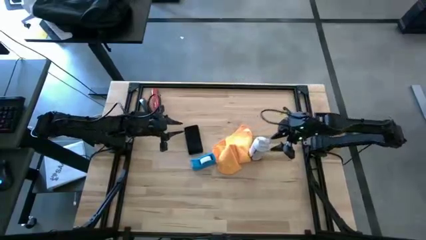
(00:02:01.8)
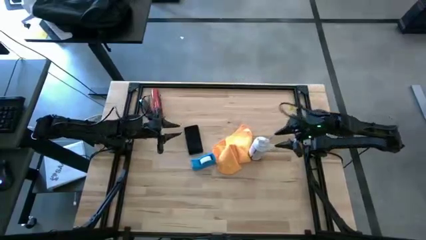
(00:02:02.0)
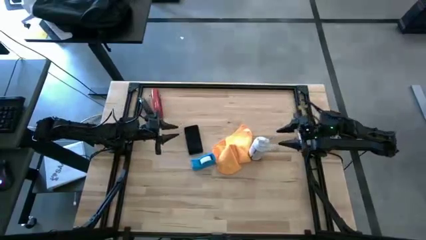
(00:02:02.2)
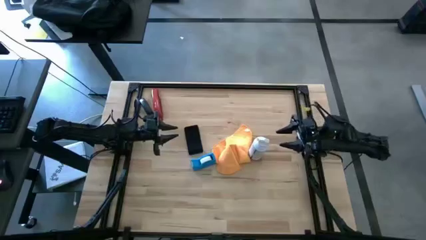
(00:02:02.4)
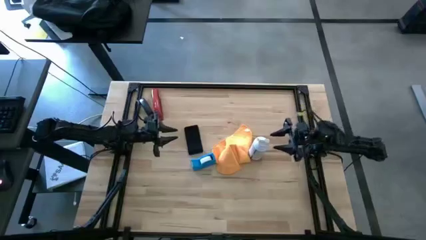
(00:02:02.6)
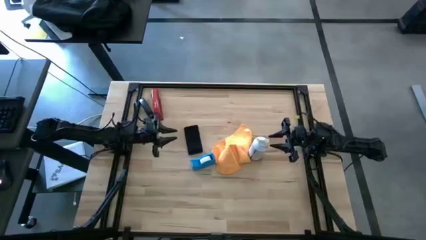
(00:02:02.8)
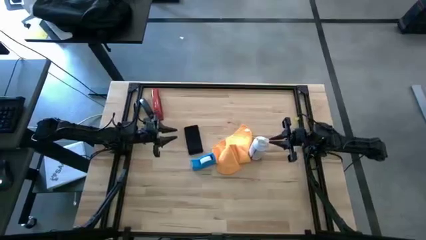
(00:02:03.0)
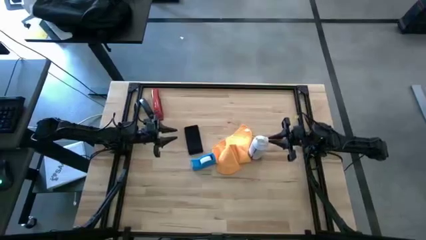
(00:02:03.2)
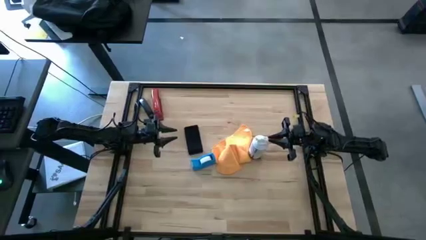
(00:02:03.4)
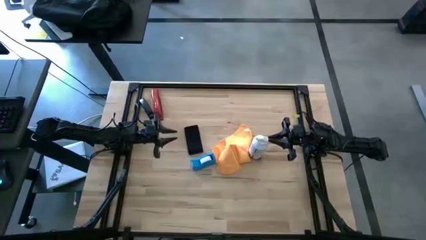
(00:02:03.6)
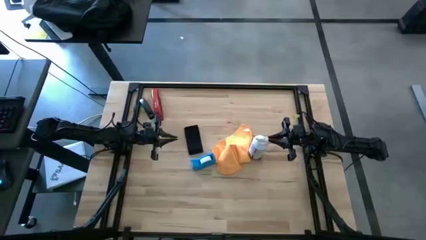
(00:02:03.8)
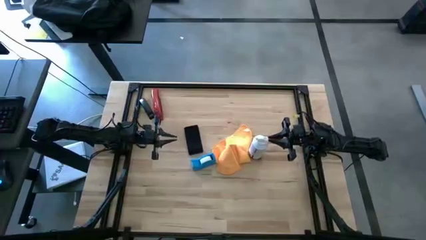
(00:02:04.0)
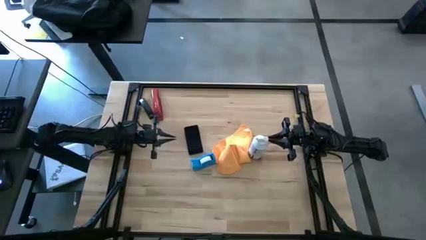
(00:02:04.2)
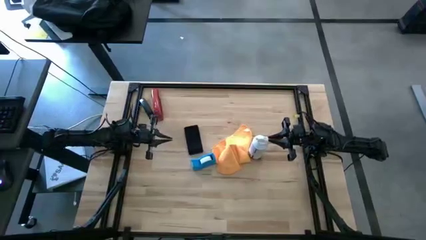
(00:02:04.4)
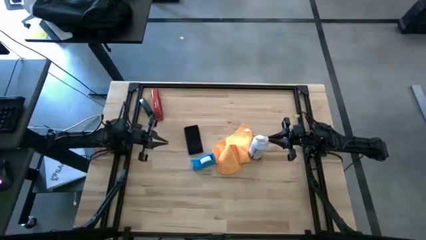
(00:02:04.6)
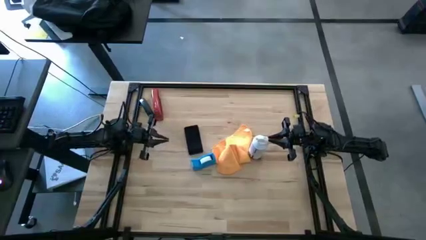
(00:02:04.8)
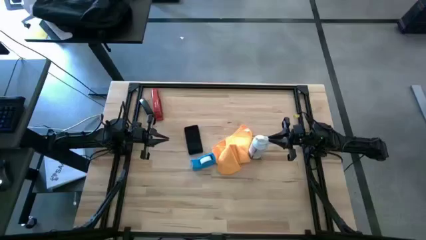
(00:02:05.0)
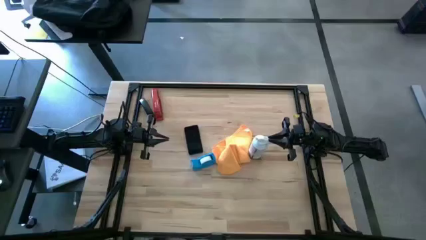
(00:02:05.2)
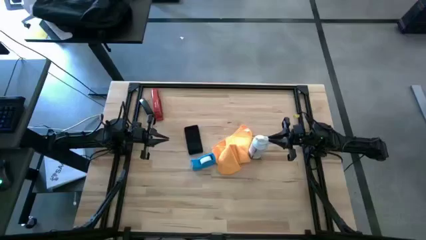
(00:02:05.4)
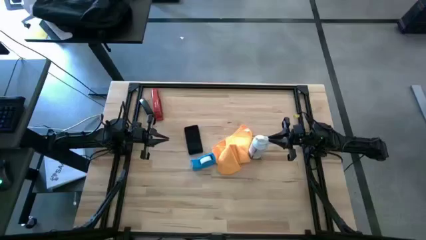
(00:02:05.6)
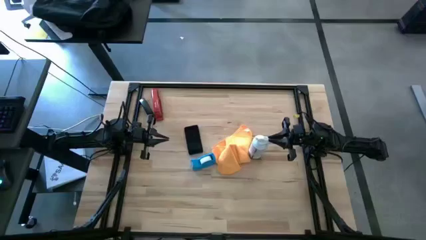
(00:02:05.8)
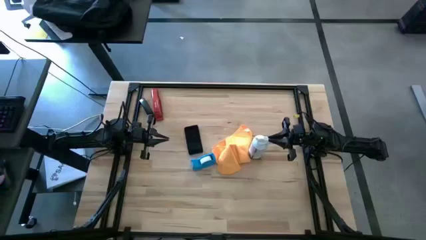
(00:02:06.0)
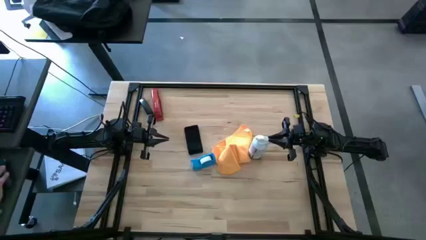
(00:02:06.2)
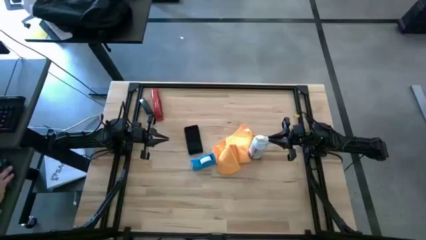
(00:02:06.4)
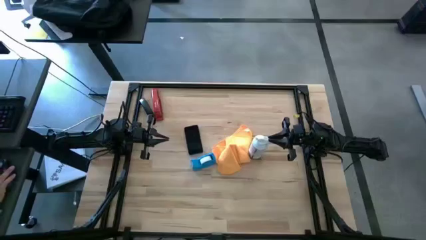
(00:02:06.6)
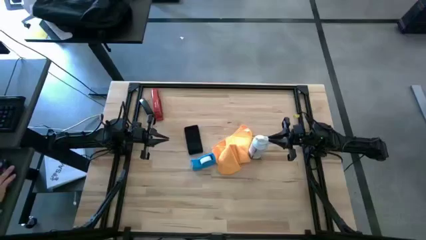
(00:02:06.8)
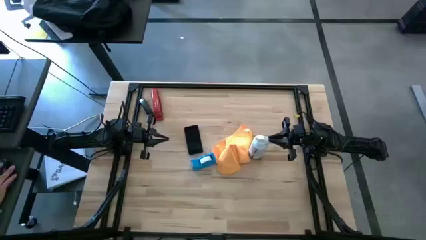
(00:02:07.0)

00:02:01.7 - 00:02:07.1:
Task: Apply microfiber cloth
Return to Home Position

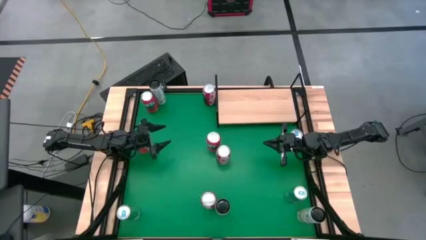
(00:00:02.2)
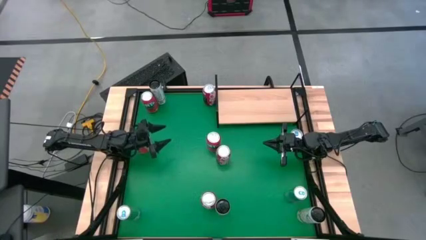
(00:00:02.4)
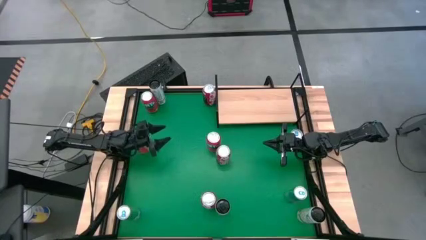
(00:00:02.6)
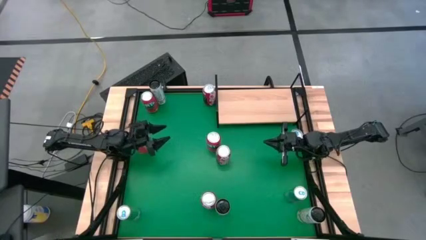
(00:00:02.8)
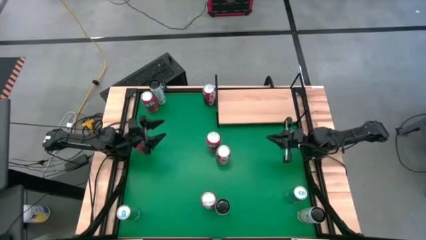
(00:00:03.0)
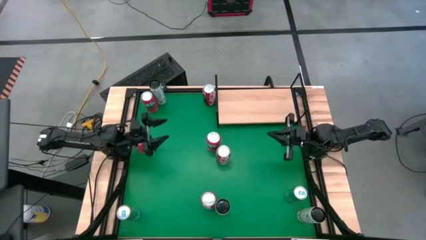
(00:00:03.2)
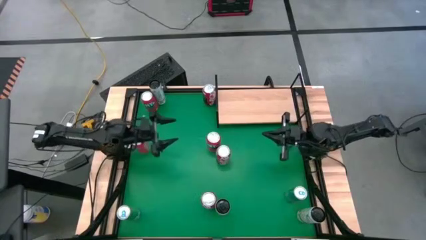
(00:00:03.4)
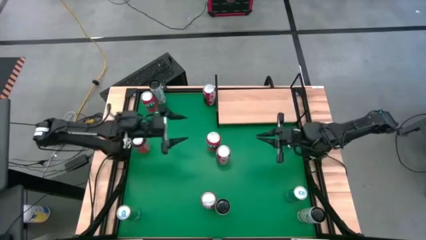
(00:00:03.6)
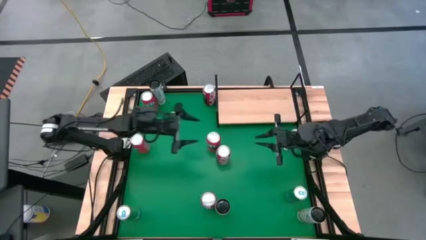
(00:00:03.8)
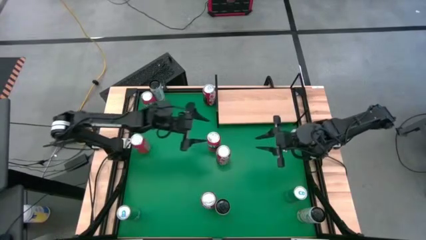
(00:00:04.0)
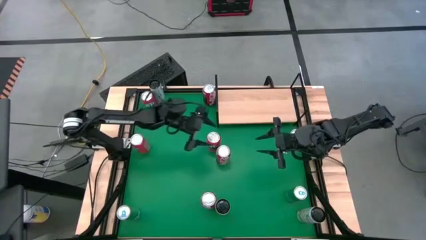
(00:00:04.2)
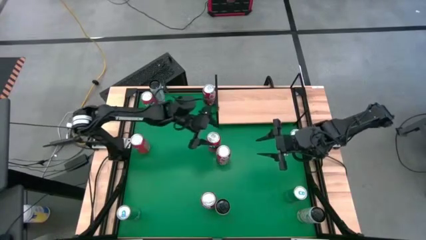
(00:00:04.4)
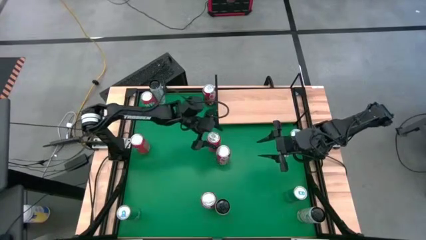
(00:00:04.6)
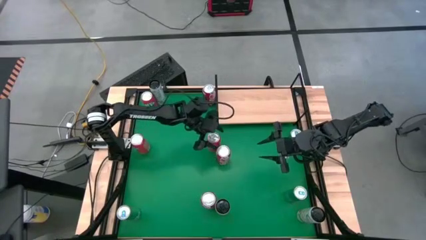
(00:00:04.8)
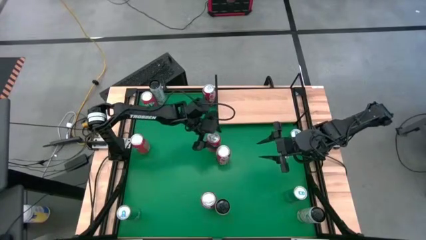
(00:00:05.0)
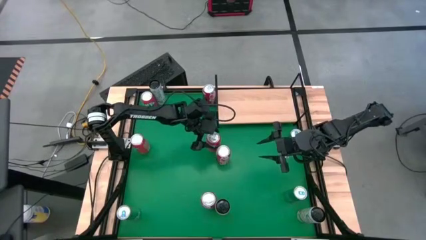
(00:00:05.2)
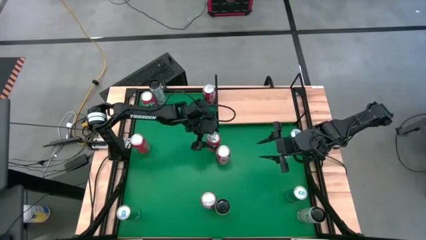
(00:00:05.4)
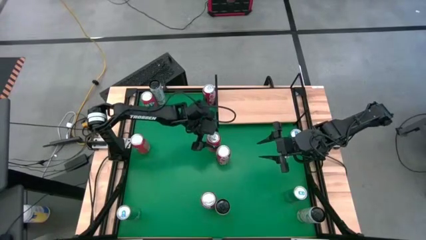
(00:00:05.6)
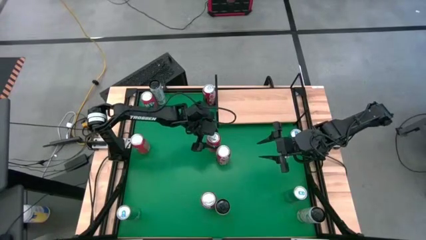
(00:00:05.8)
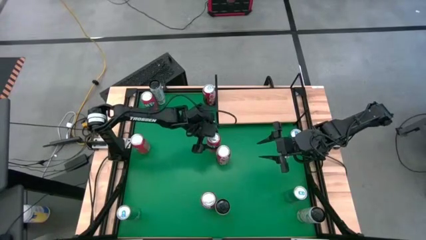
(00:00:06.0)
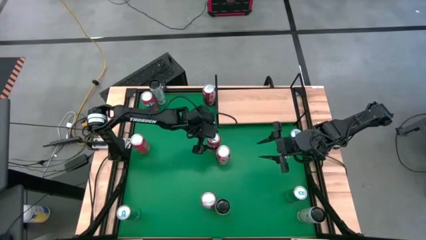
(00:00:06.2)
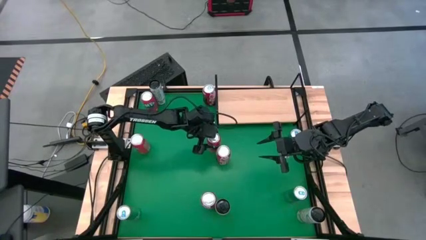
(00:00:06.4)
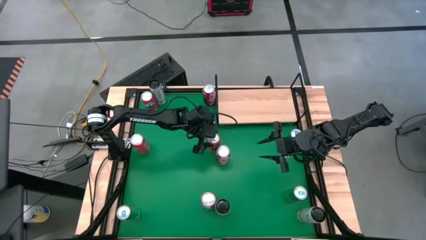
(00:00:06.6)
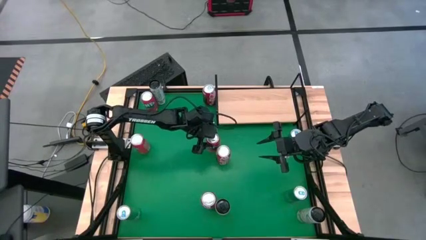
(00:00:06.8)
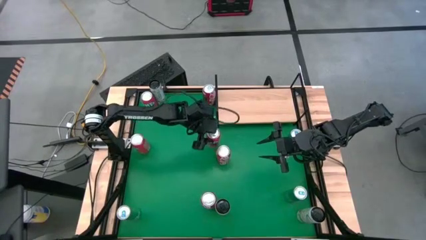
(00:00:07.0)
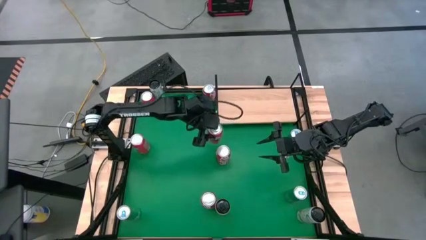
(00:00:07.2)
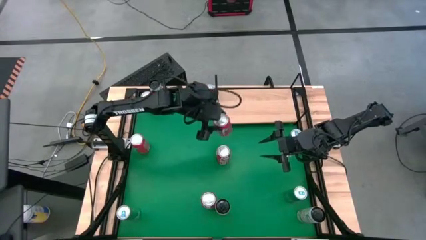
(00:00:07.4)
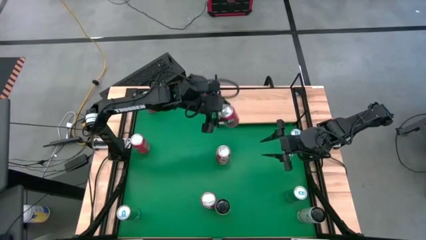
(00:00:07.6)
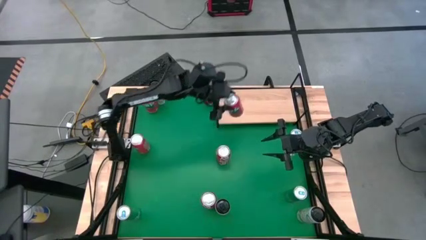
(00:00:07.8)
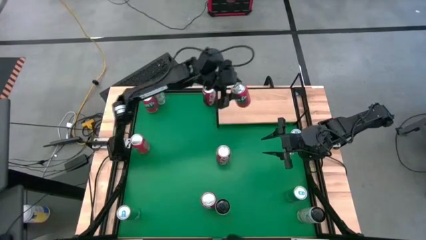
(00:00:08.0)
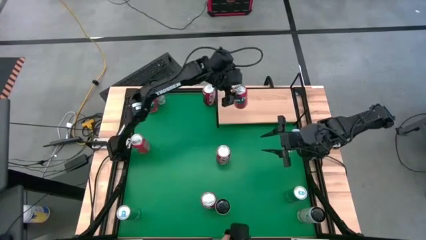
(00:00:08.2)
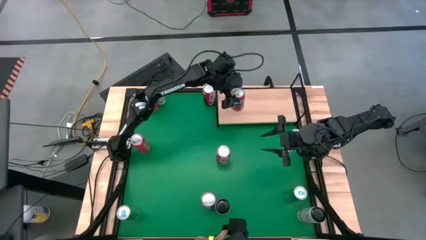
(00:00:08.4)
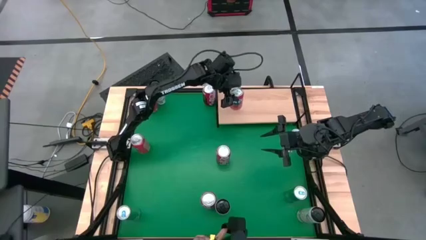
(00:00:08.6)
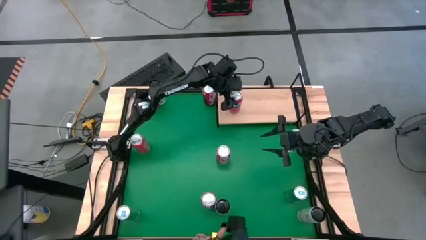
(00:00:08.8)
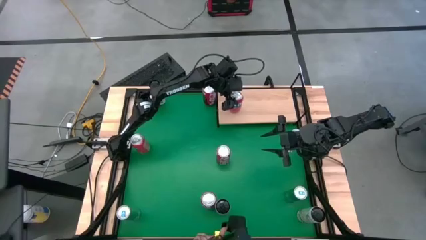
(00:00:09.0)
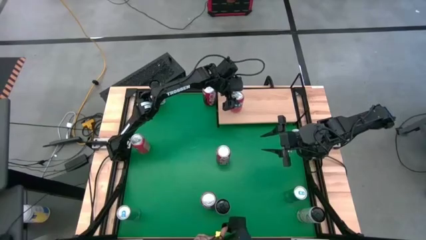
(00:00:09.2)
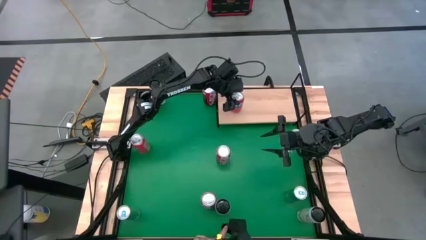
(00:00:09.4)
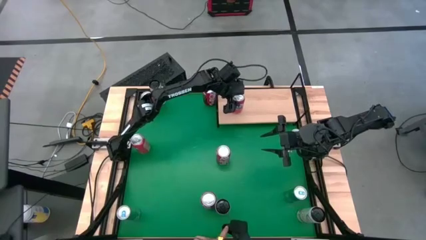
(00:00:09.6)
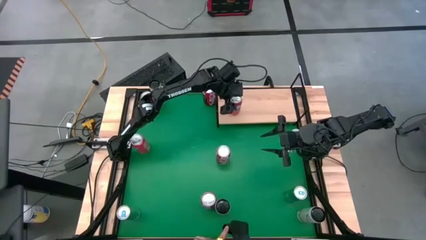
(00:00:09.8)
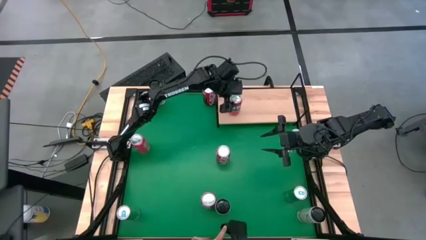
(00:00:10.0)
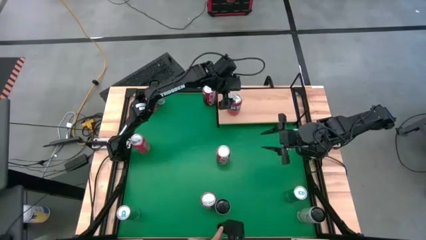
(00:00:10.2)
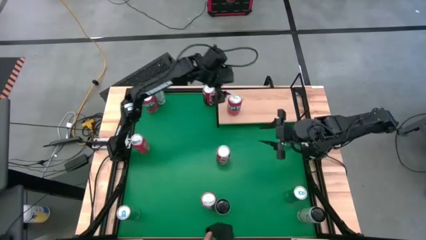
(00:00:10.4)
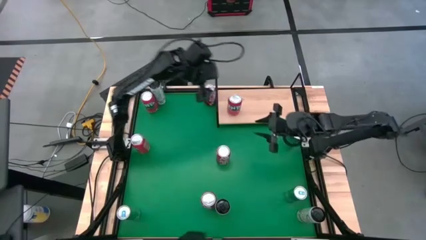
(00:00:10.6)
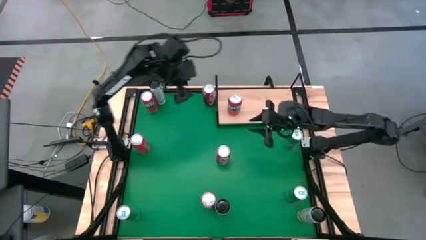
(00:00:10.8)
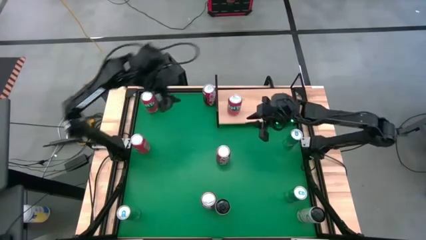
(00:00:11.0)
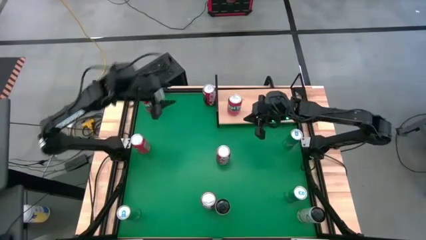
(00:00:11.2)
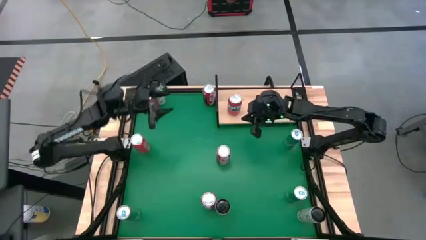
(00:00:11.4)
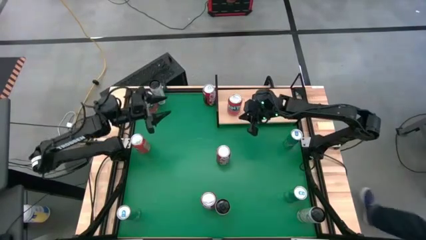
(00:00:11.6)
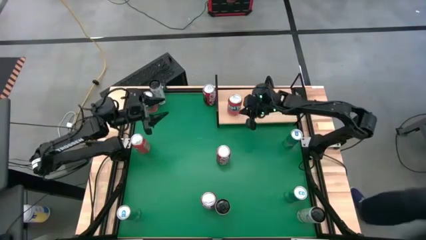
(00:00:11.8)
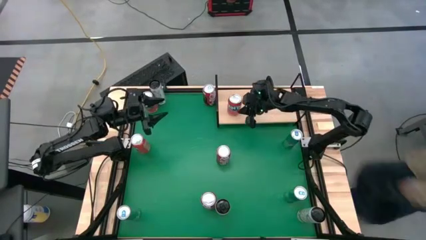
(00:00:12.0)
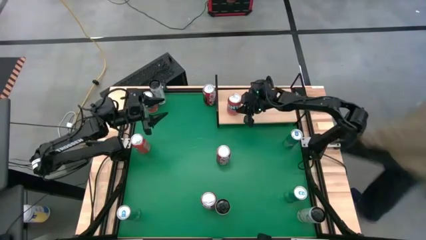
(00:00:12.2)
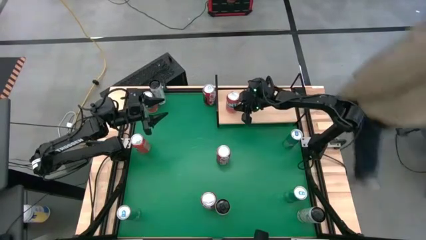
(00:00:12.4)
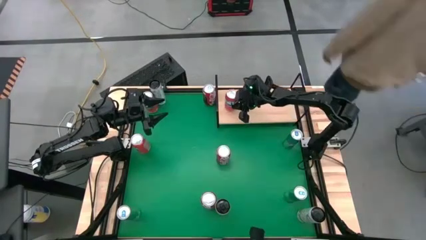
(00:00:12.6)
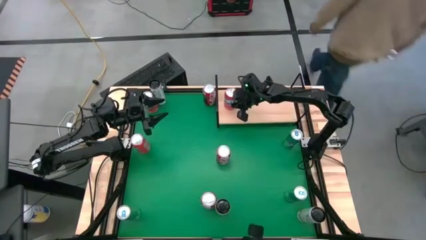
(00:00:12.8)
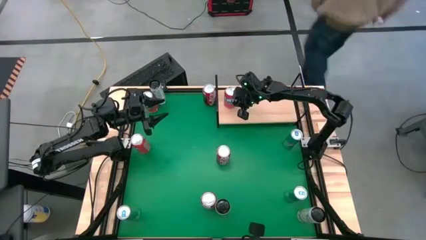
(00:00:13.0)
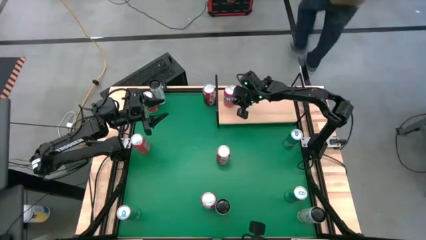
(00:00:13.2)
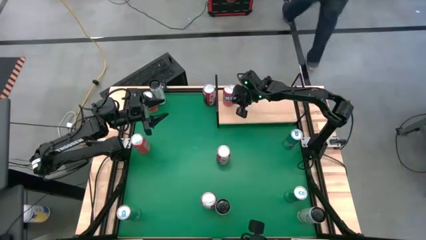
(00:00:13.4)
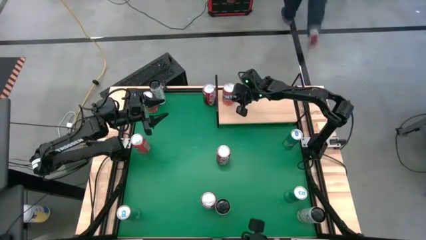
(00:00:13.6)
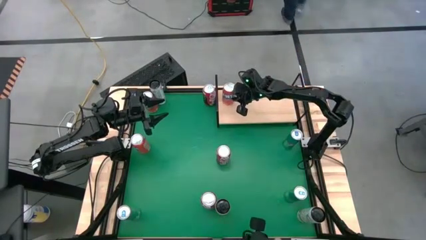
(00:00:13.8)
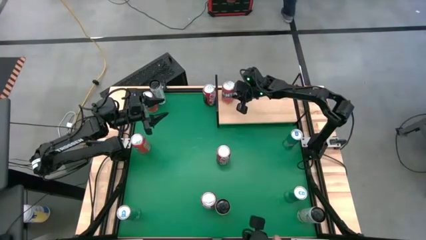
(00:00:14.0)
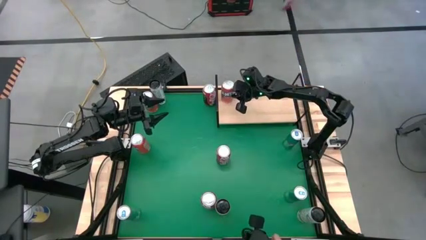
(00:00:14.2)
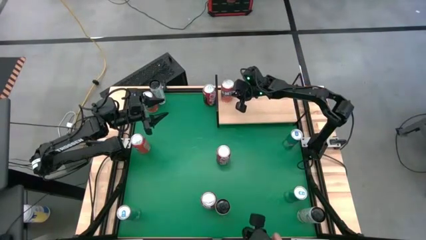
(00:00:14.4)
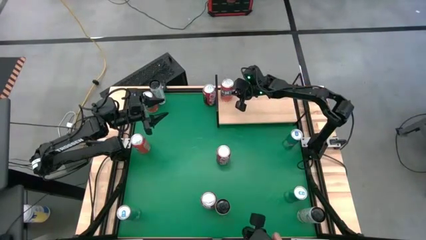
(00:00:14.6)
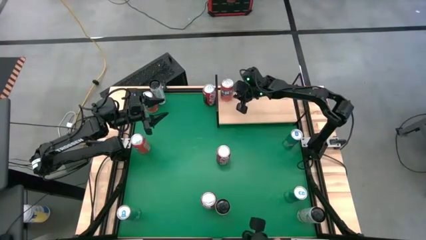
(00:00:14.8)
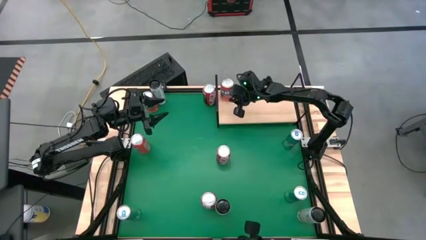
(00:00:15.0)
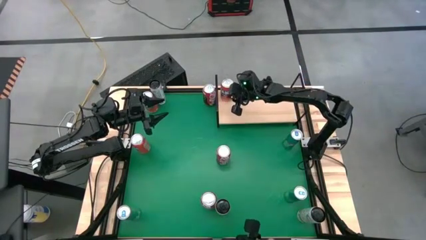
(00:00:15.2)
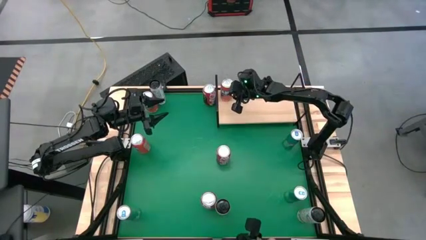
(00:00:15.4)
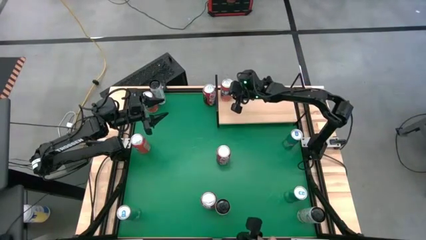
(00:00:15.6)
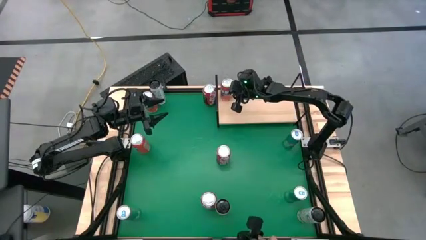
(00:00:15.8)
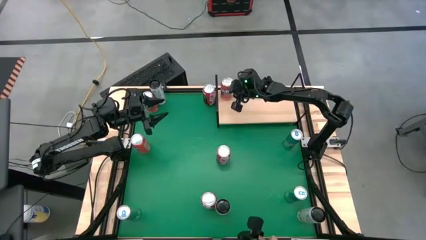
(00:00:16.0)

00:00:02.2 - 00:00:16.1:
Task: Place canned beverage on shelf
Put the bottom right red soda can on the shelf
